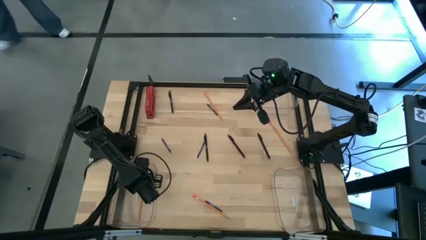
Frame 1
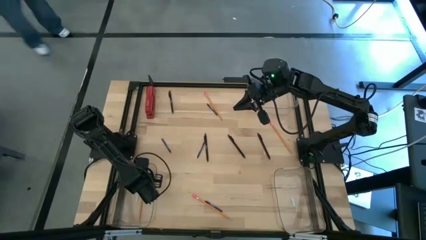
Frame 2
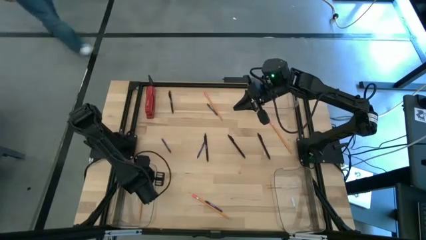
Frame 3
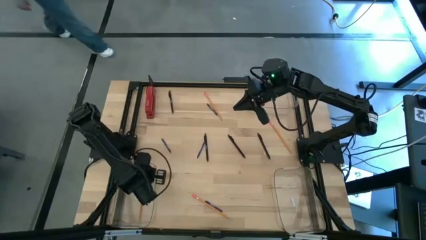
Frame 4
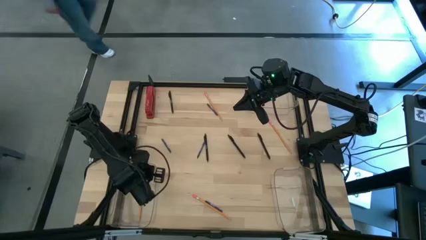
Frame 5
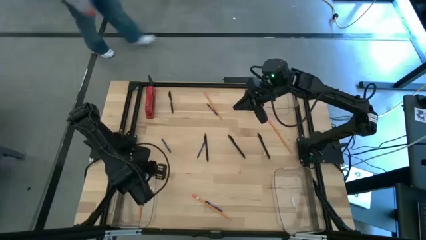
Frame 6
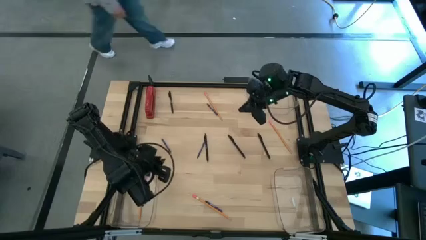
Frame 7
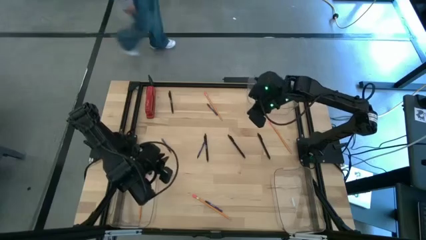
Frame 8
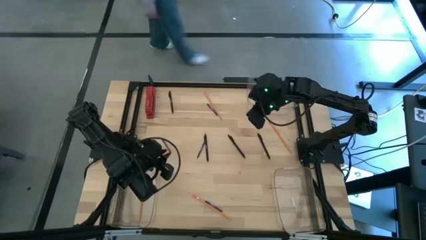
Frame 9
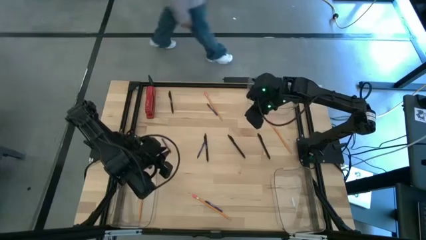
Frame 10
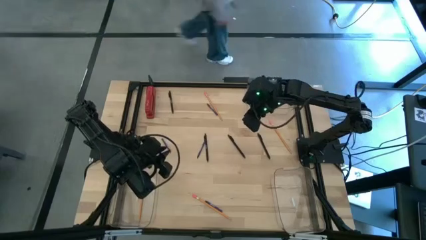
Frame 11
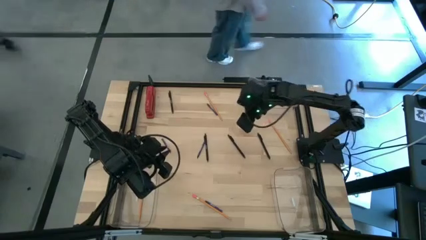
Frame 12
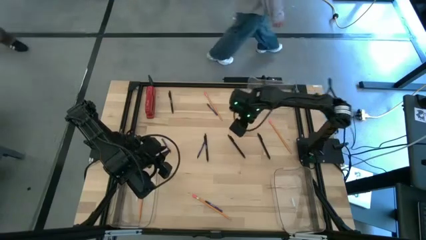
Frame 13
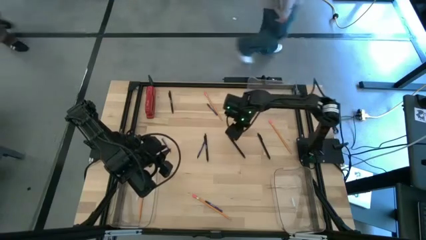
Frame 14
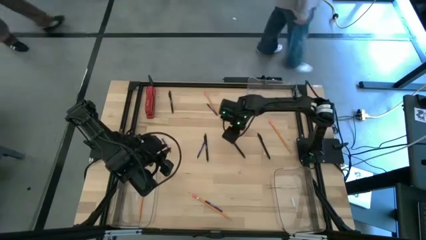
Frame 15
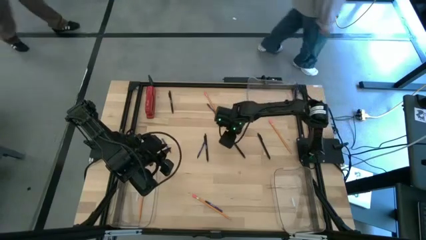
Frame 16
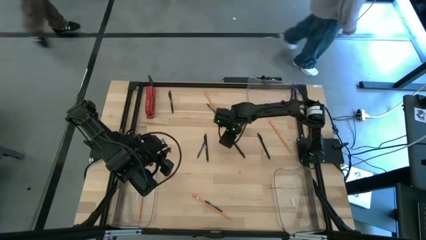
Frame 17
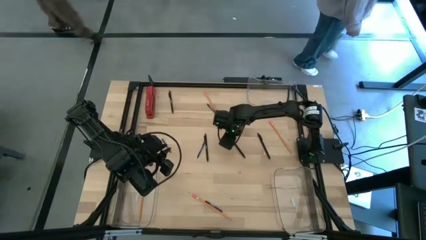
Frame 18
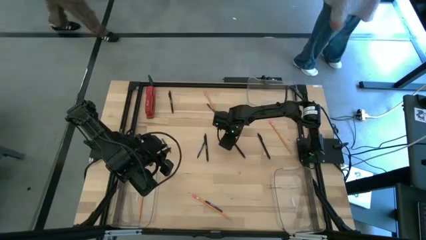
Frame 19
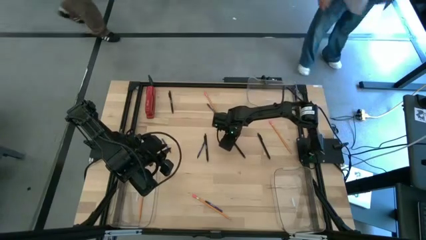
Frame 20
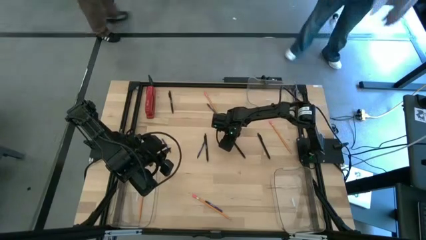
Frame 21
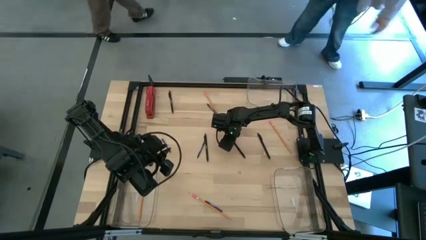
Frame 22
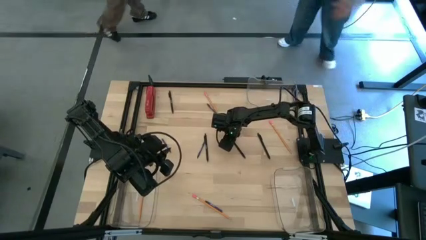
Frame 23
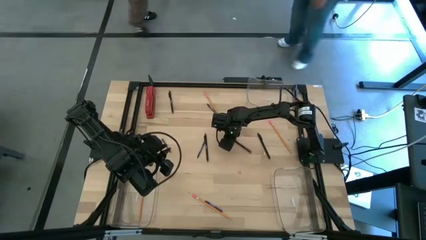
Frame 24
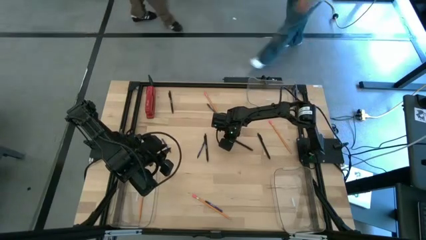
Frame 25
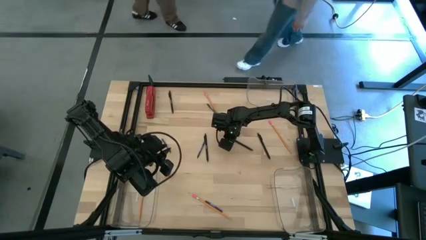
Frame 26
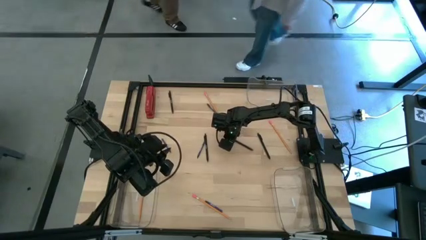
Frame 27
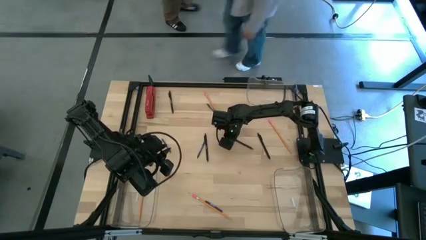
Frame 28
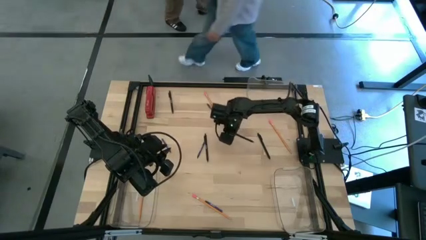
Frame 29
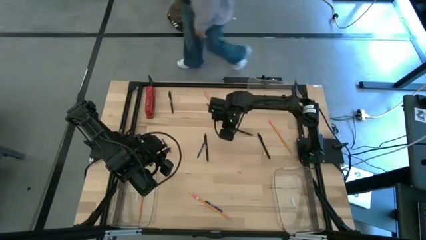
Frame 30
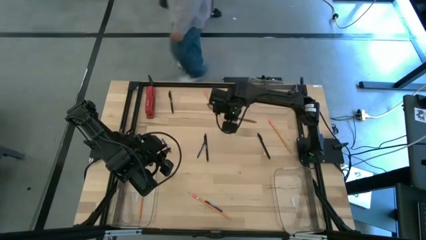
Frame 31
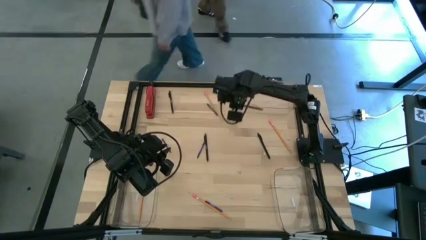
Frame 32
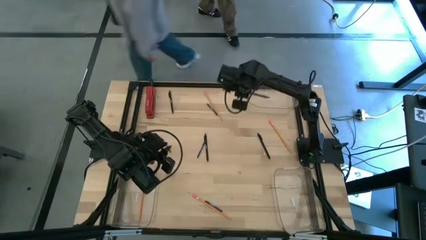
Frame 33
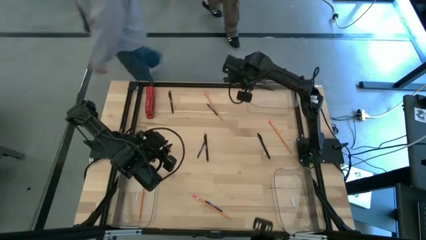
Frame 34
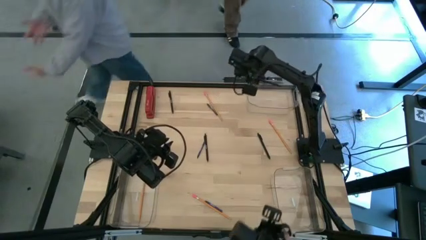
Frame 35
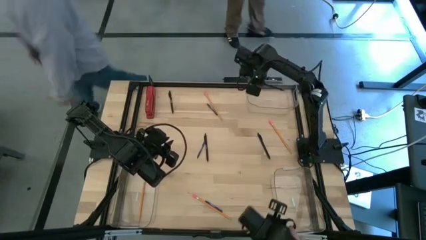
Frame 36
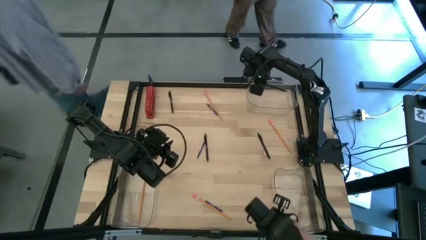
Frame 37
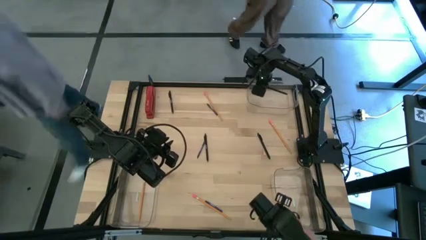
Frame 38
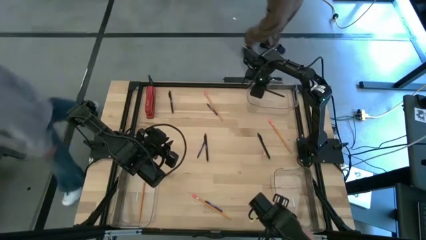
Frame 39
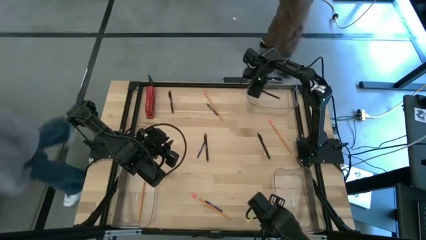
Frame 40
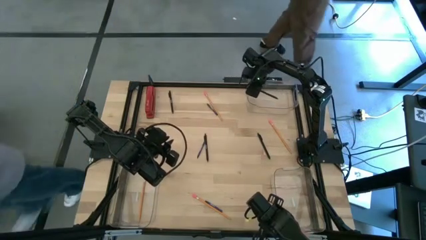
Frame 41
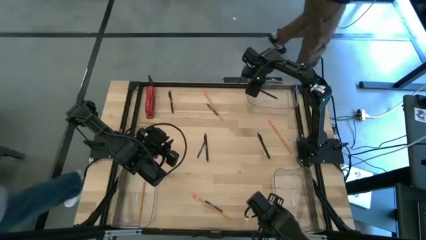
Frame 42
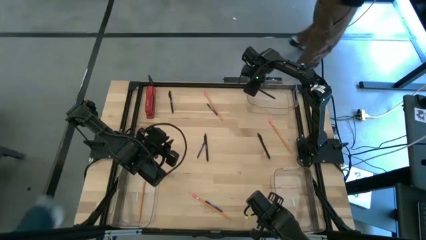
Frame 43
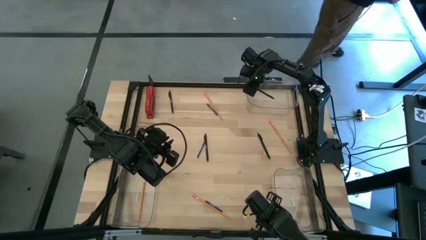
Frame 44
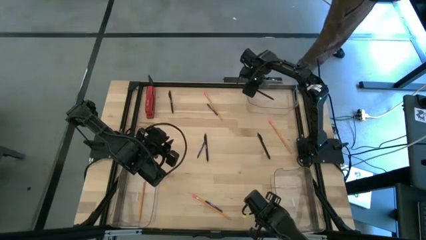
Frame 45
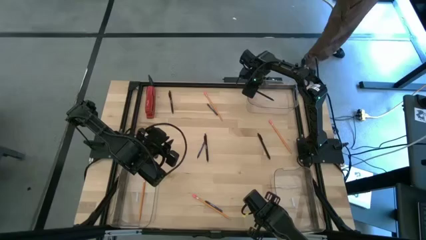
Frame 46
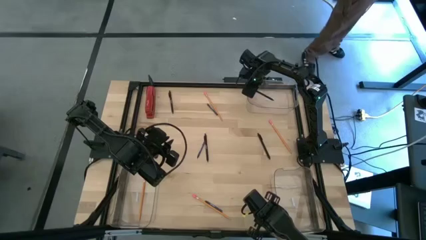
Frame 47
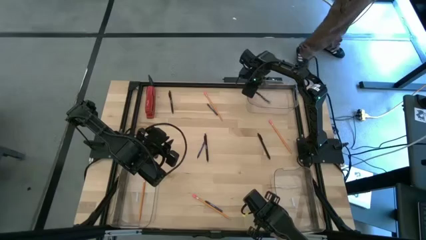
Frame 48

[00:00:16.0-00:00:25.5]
Task: Sort crayons/erasers/pens/pencils in bins
Put the black pen into the top transparent bin
